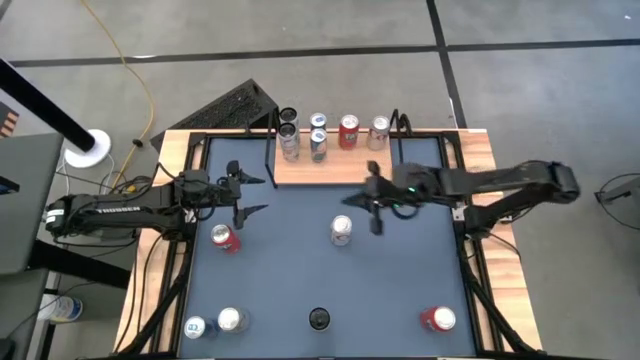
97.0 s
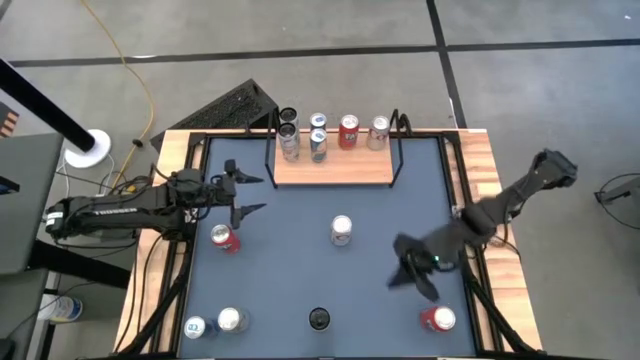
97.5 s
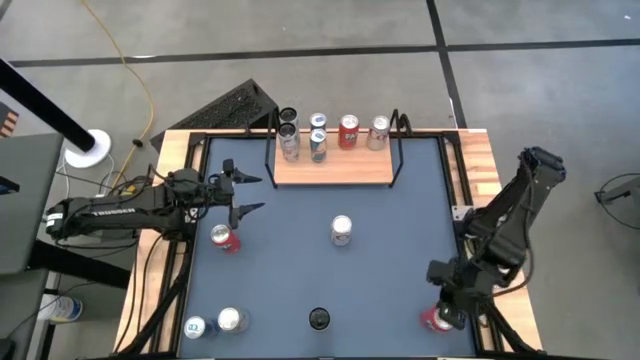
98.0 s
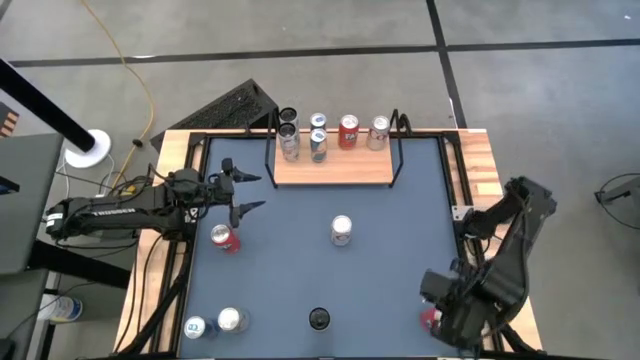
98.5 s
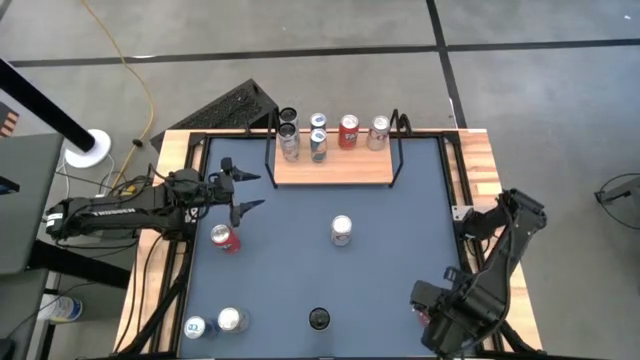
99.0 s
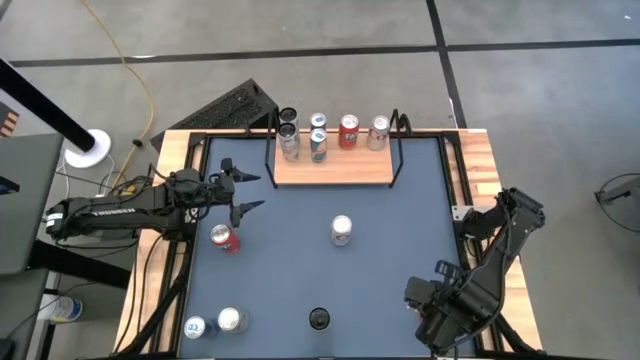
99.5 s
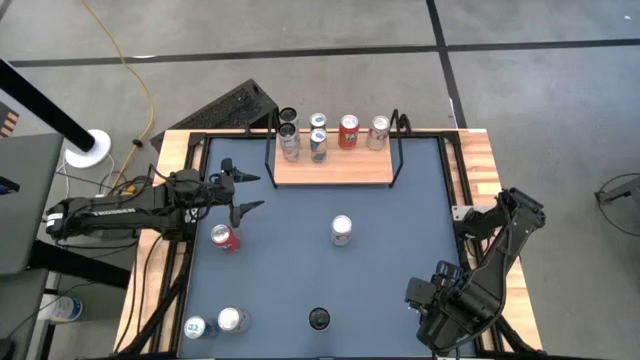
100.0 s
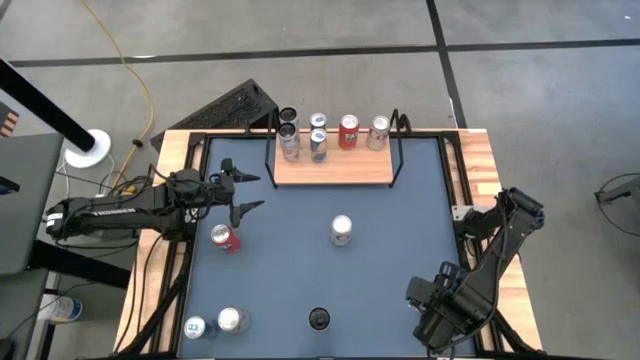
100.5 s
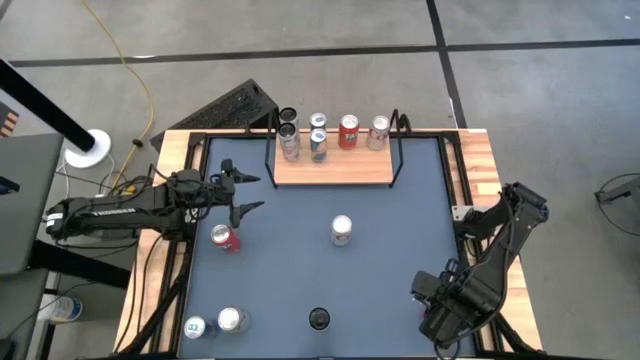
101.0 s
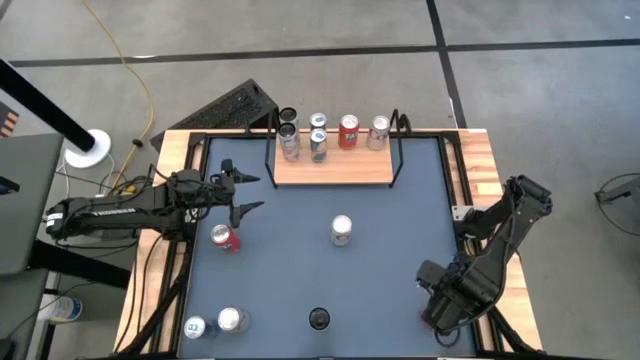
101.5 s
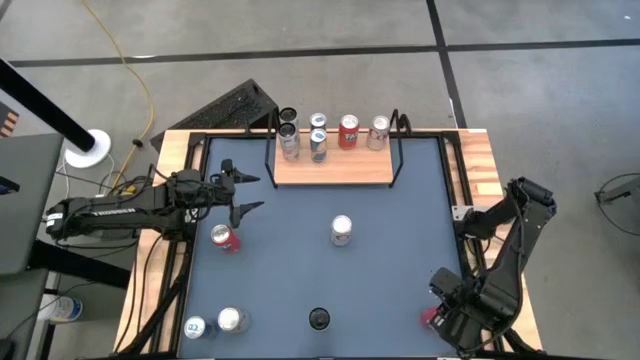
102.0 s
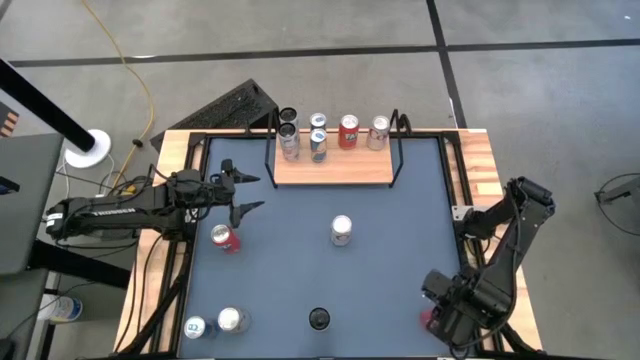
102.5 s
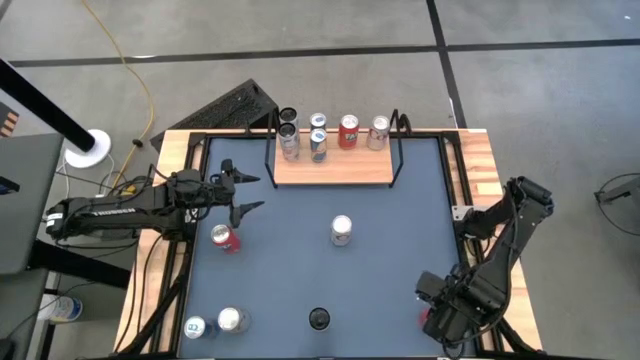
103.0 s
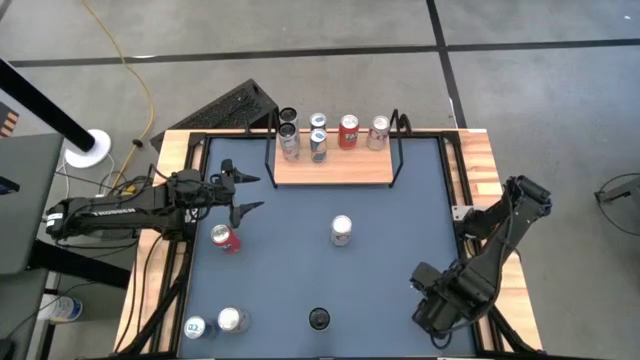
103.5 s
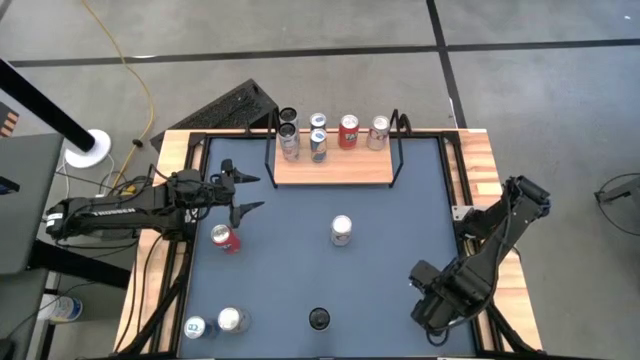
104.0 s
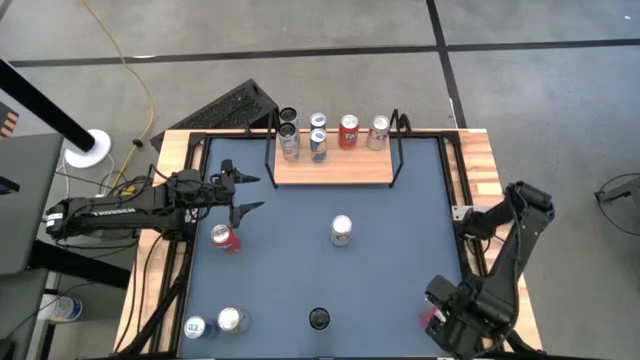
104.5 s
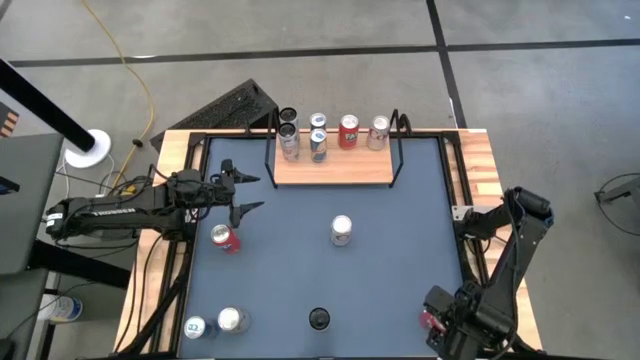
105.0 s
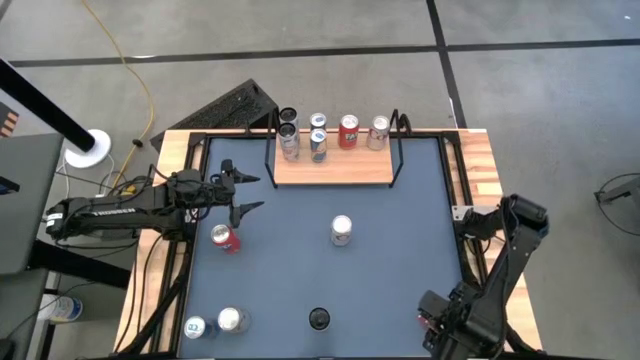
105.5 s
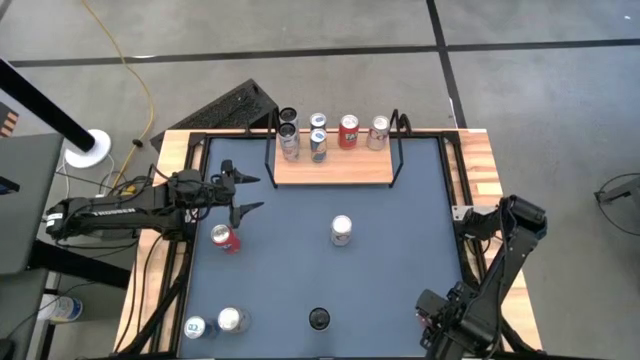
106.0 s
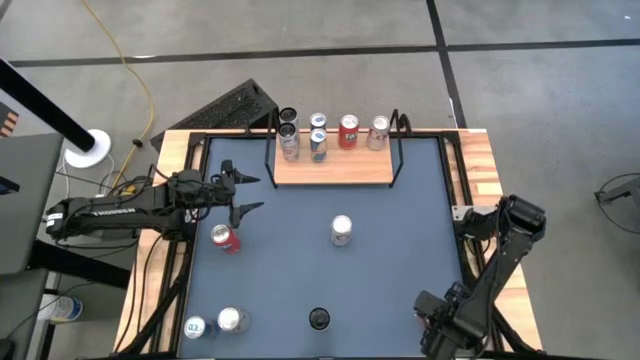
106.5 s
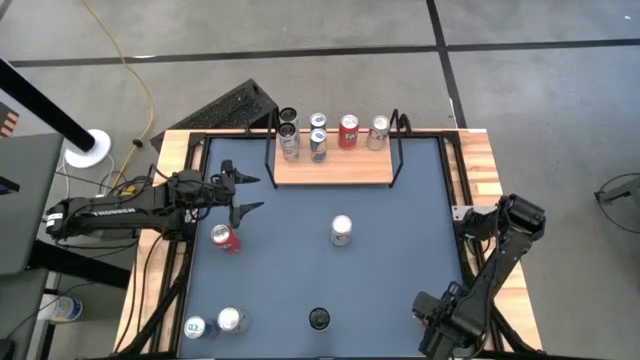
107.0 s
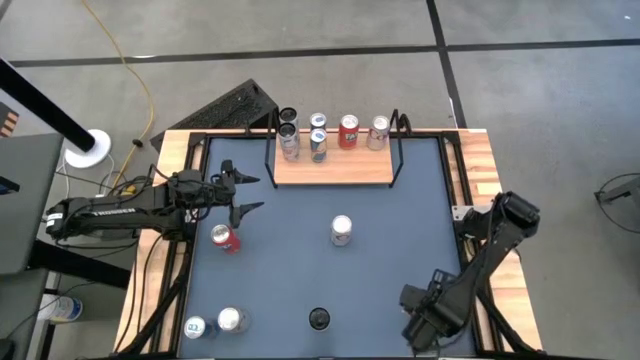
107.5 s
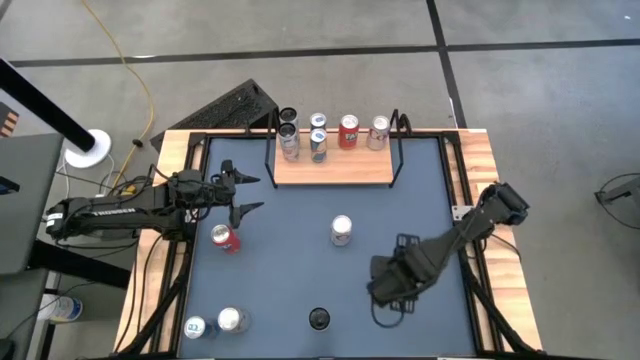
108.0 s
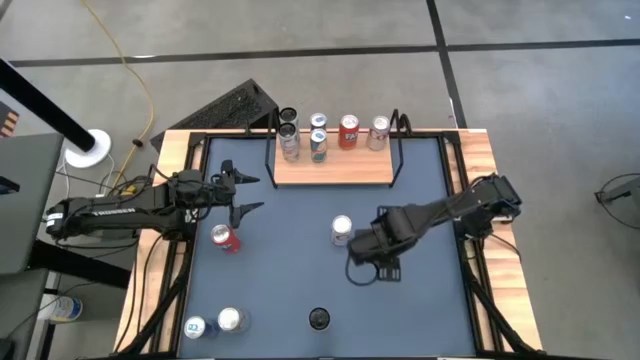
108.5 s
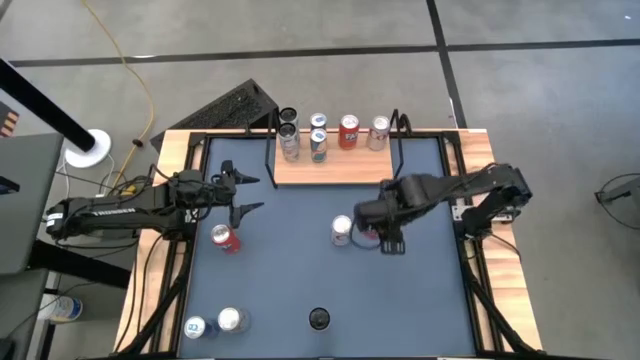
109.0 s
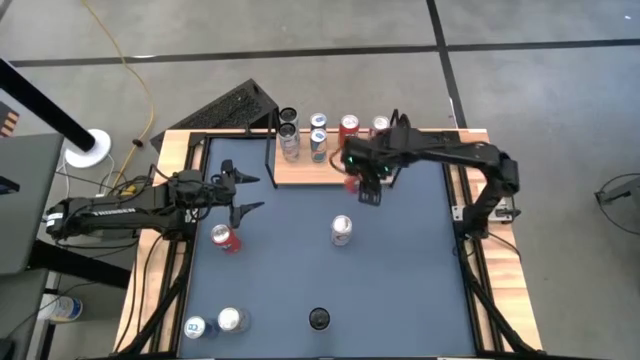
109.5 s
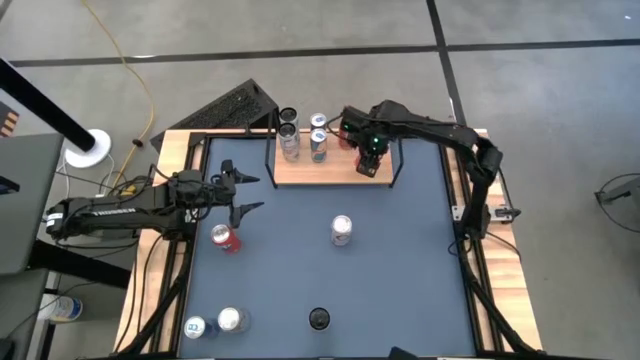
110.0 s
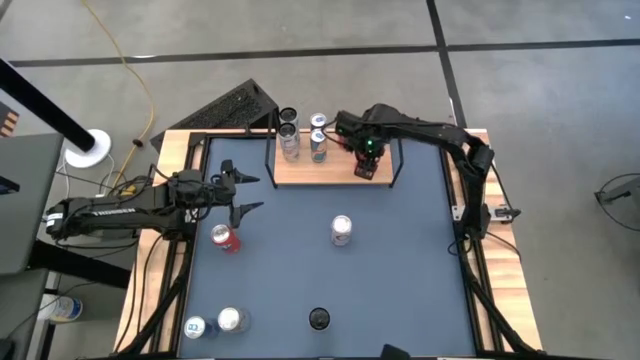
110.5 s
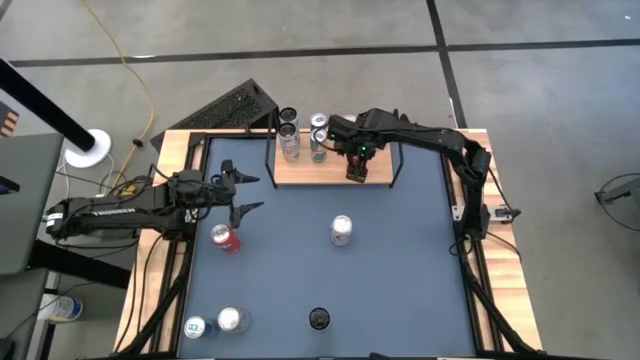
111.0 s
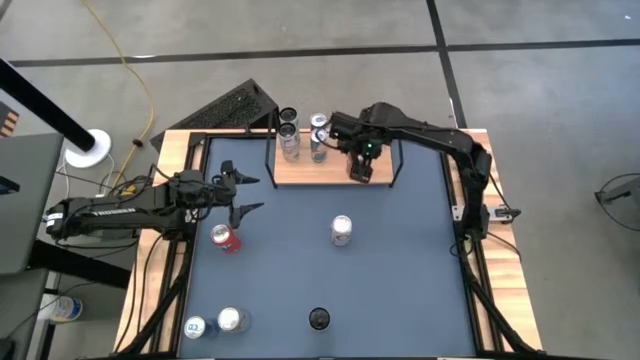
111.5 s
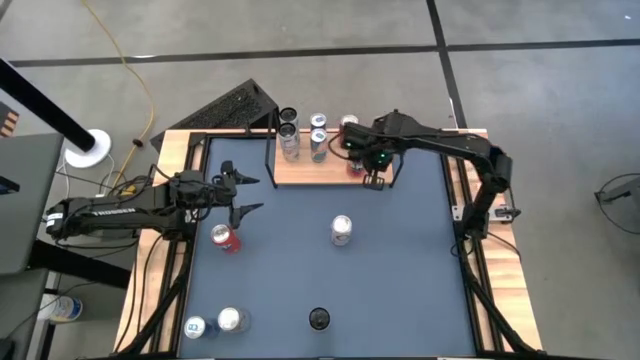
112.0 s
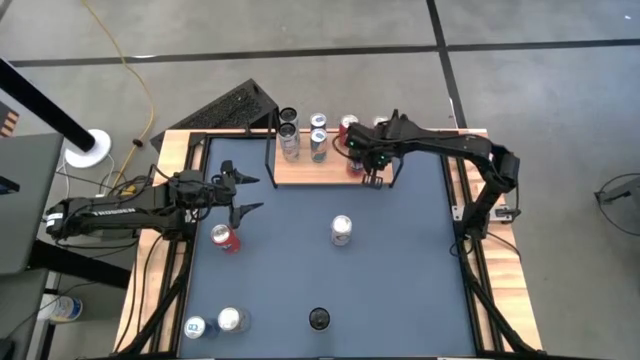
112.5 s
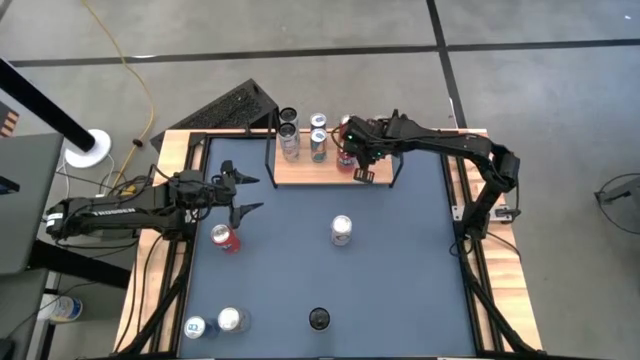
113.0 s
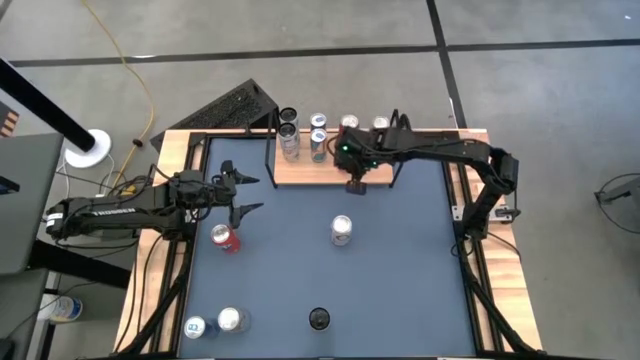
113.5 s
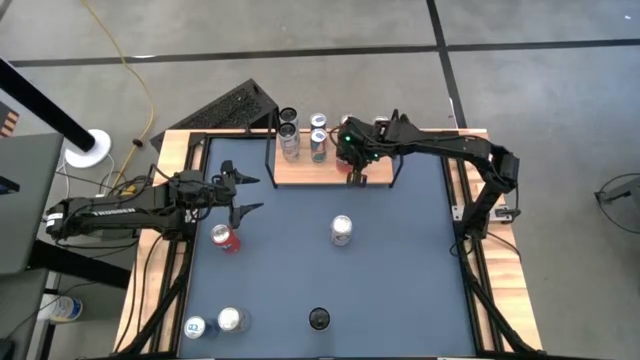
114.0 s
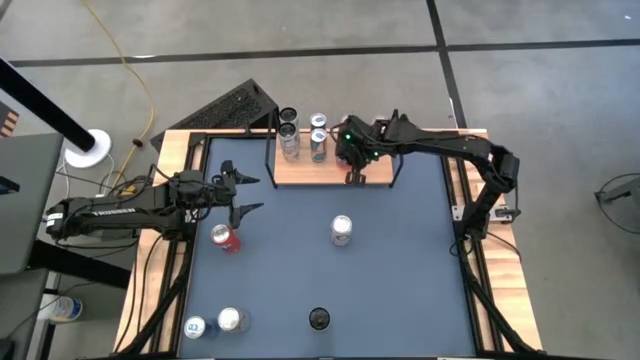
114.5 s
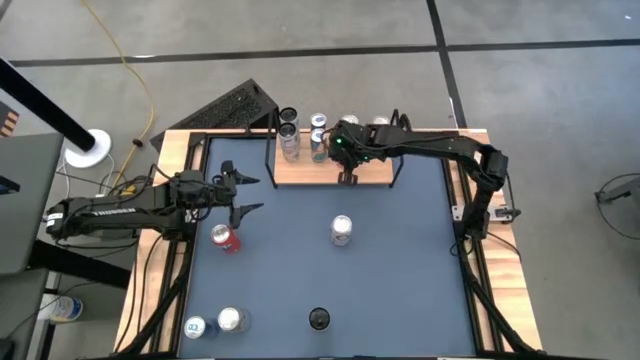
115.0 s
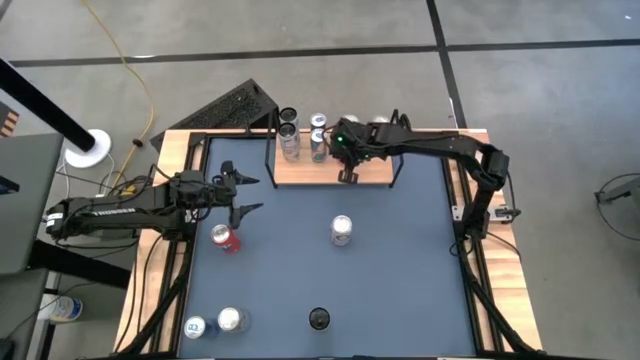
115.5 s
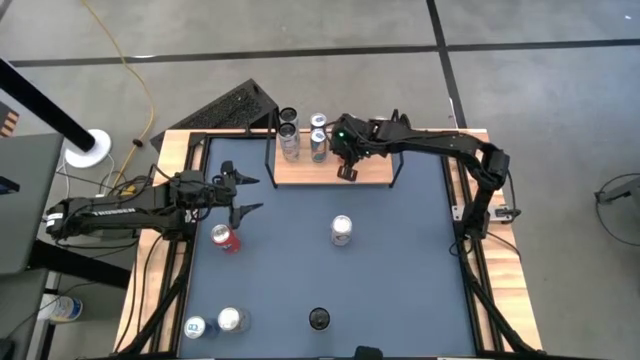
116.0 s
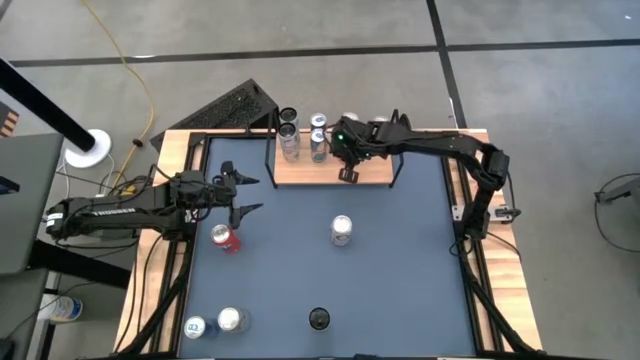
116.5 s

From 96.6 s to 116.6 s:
Task: Place canned beverage on shelf
Put the bottom red soda can on the shelf aligned with the other red soda can

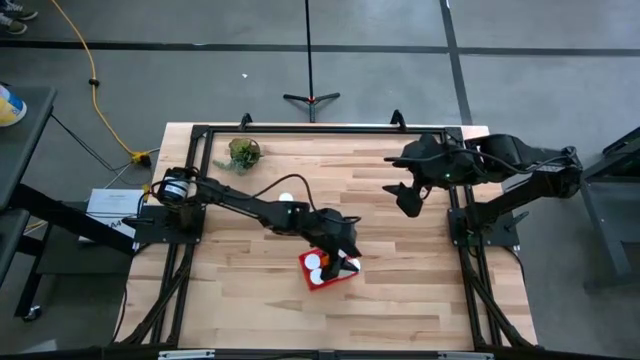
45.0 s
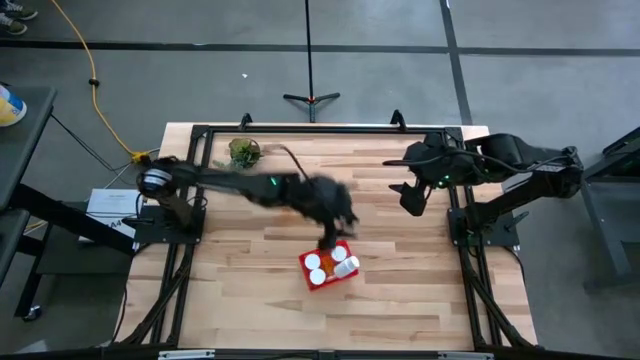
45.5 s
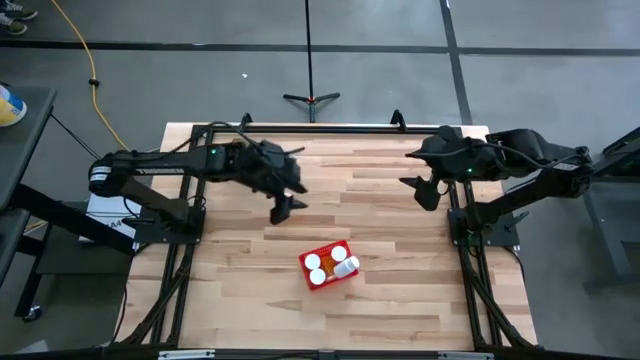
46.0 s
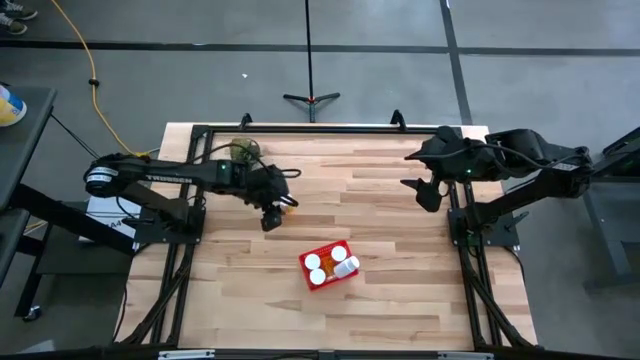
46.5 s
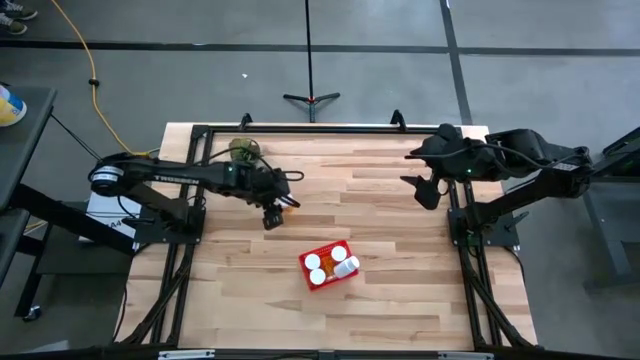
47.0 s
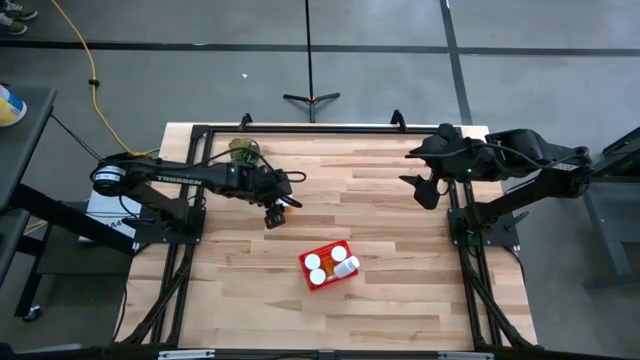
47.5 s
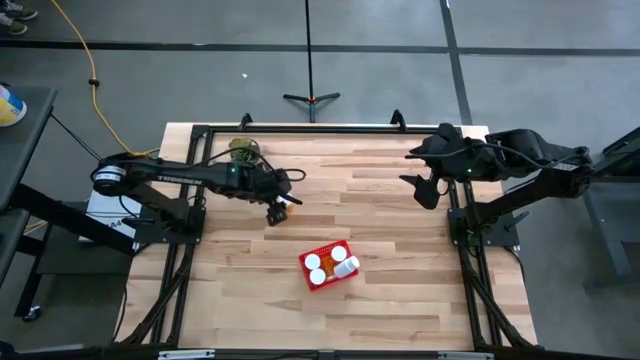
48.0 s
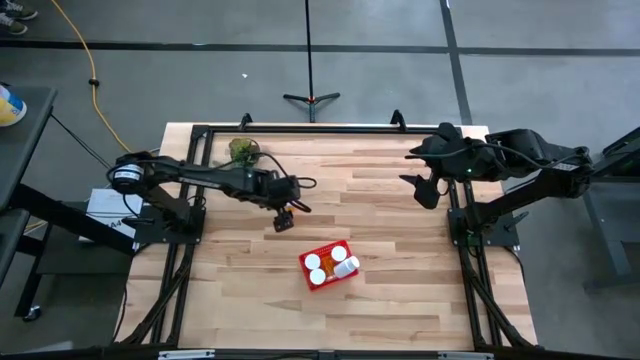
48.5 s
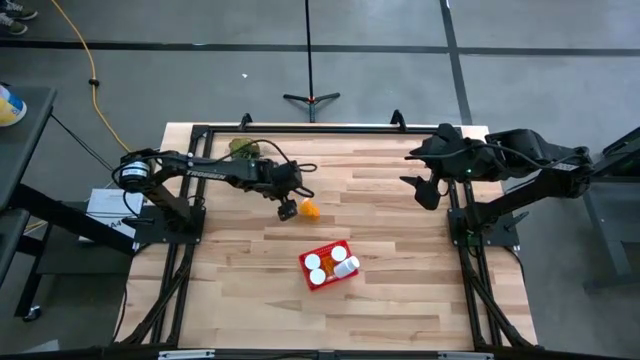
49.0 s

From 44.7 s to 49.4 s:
Task: Pick and place pill bottles into a basket
Put the orange pill bottle into the red bin
